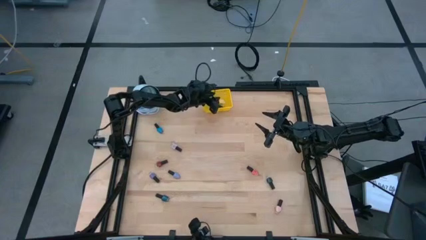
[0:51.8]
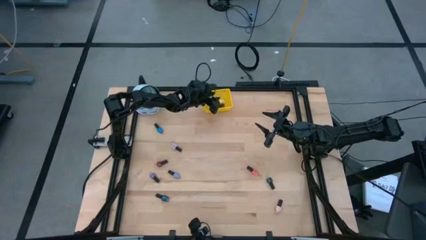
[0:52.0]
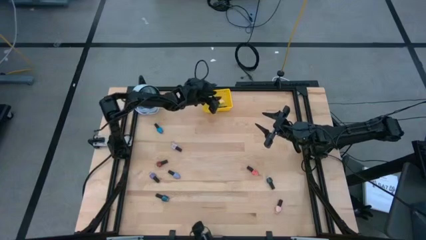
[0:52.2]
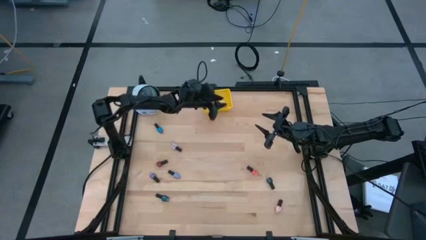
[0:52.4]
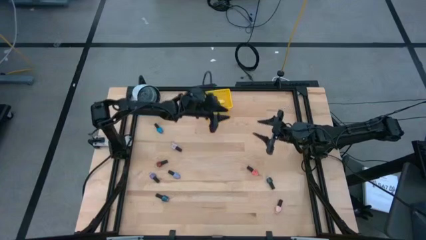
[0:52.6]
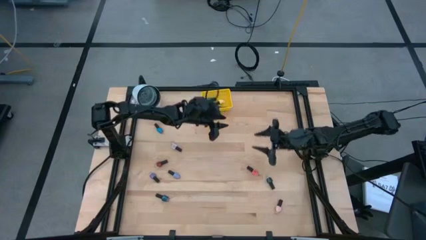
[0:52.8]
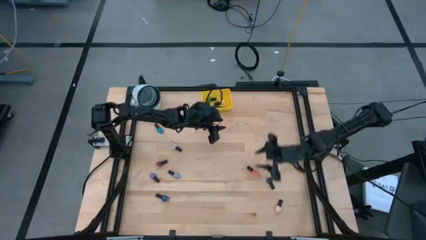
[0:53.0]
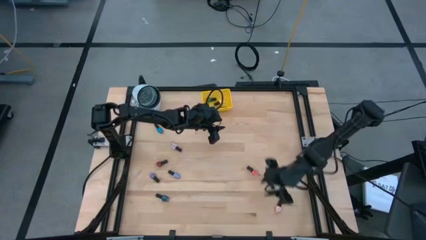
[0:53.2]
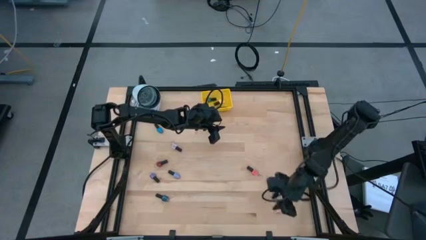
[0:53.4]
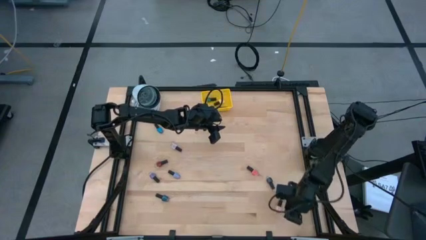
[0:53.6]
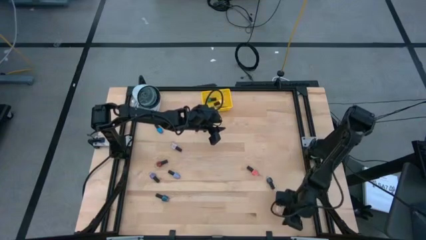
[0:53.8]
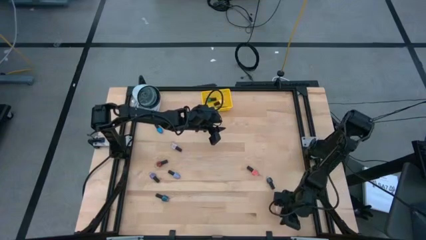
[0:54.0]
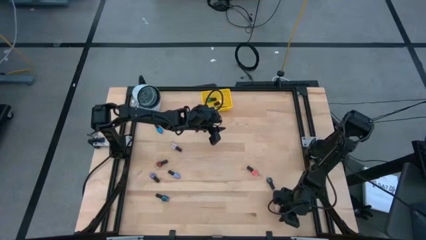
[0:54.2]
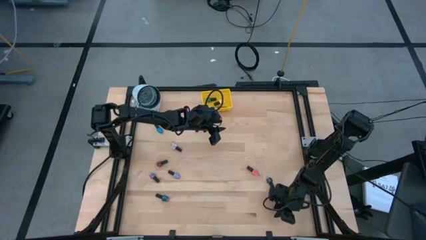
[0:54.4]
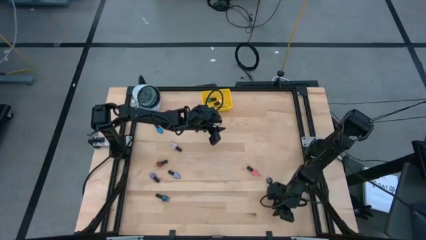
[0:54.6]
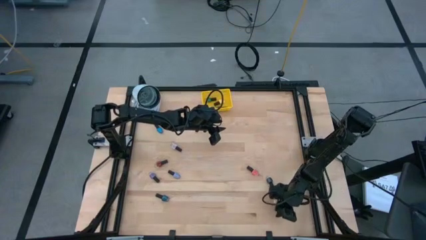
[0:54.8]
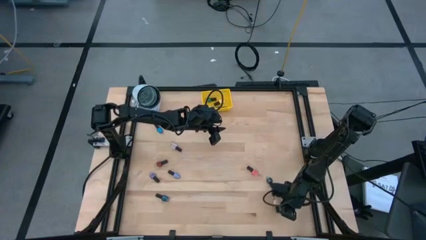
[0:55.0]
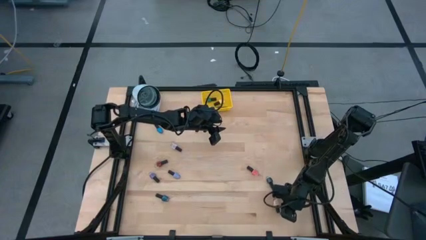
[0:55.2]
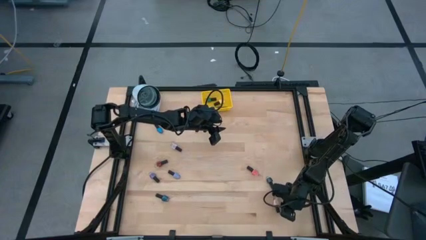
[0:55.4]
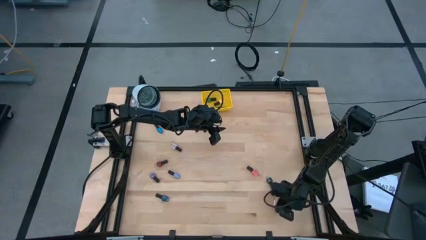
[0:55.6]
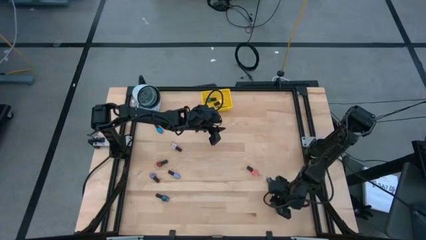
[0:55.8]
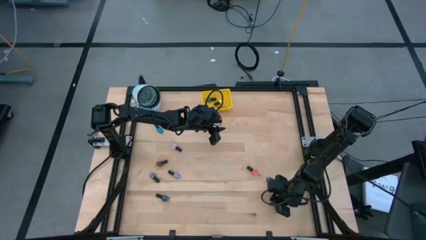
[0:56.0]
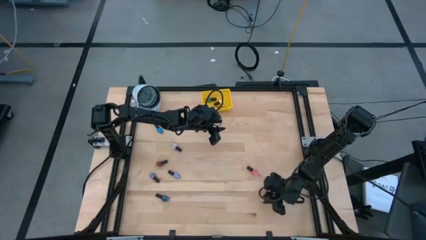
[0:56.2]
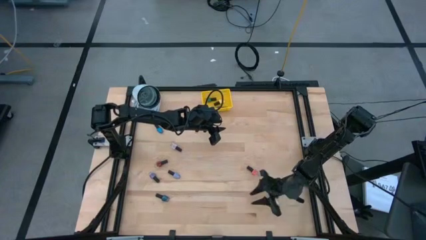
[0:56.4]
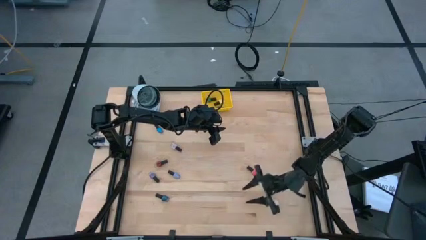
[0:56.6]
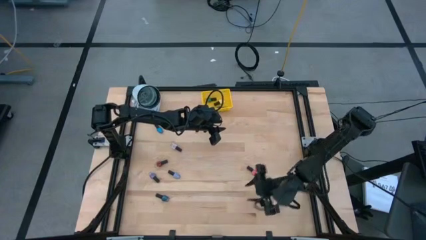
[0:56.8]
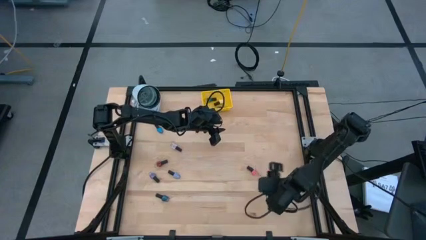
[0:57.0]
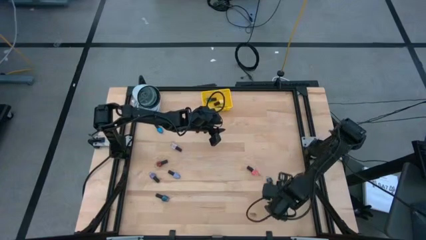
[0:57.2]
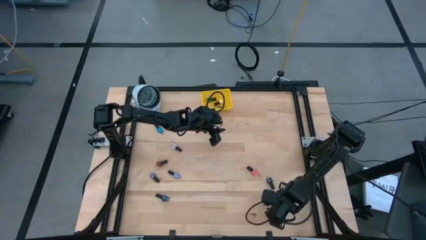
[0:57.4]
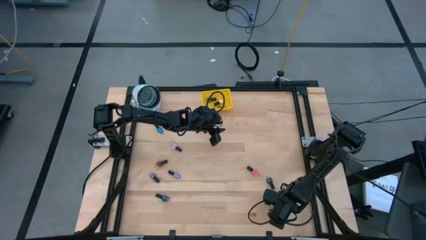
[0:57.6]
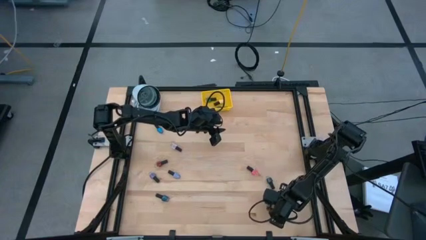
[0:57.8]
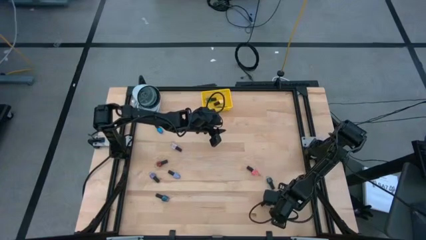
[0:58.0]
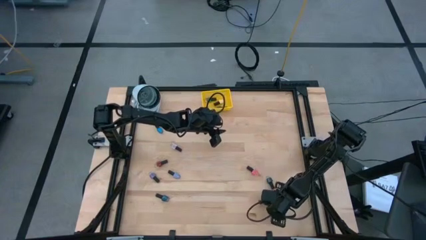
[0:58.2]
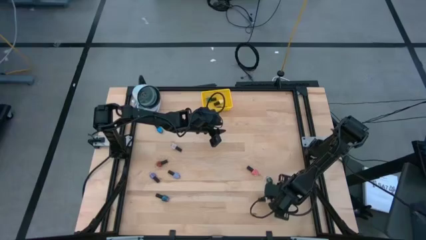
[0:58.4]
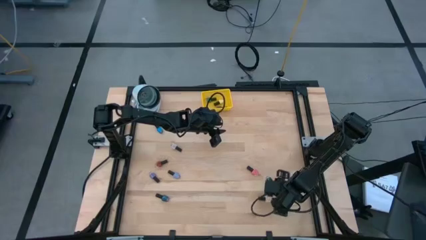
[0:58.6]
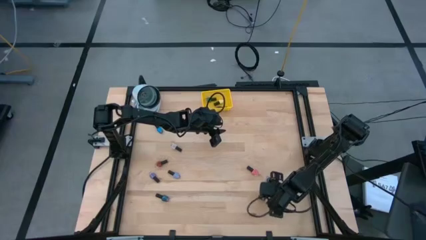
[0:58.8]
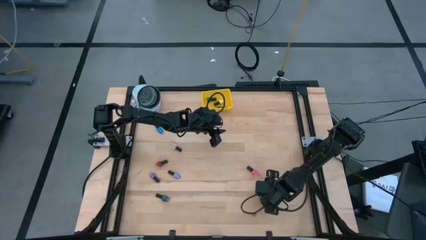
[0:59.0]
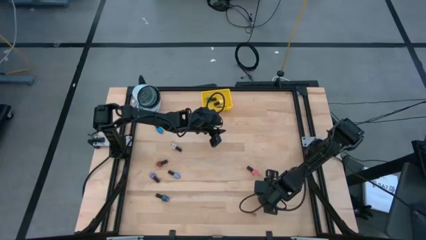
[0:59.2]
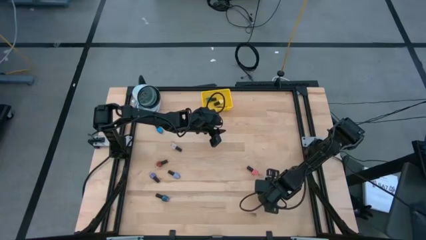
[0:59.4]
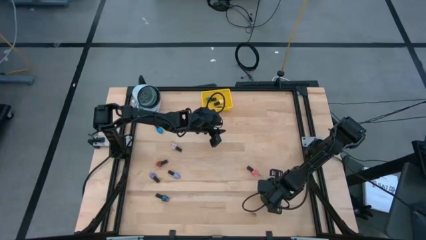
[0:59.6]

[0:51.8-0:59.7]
Task: Pick & Place Nail Polish
Put the light pink nail polish bottle into the yellow bin

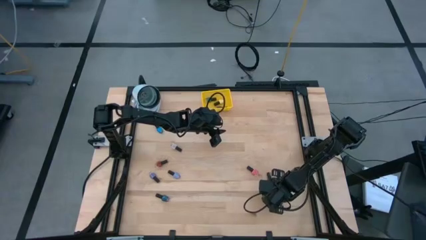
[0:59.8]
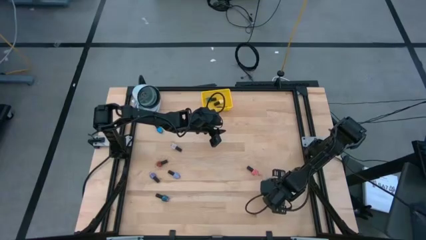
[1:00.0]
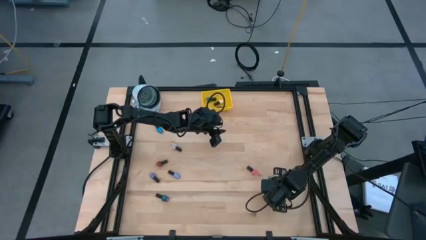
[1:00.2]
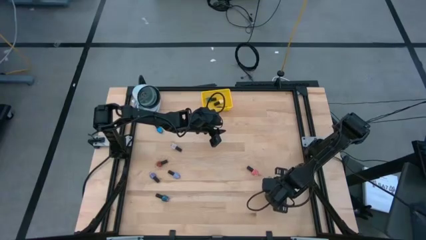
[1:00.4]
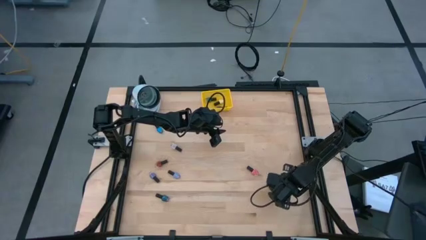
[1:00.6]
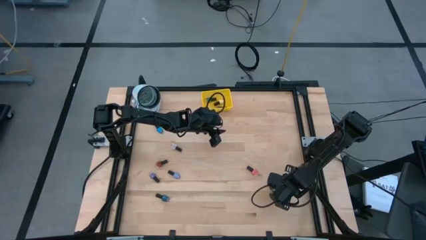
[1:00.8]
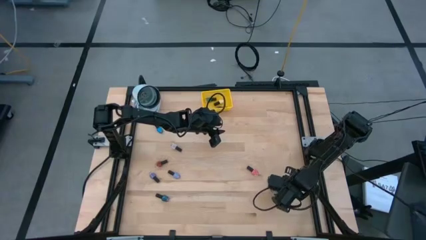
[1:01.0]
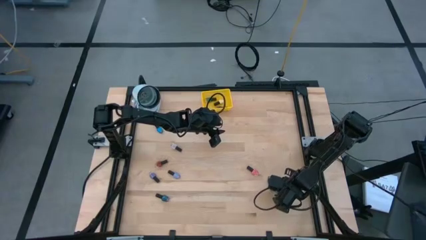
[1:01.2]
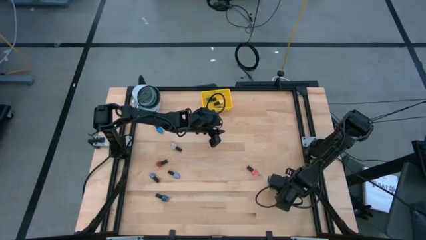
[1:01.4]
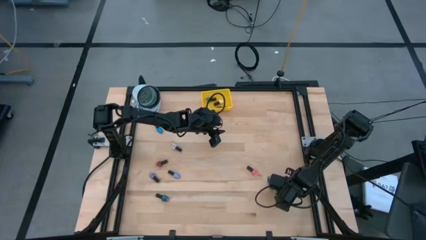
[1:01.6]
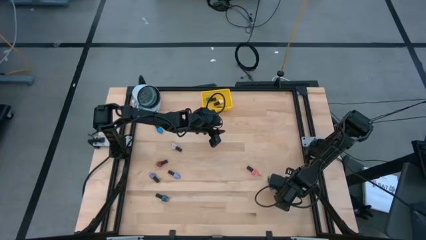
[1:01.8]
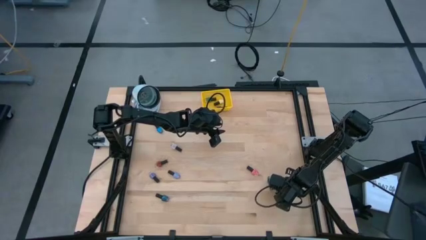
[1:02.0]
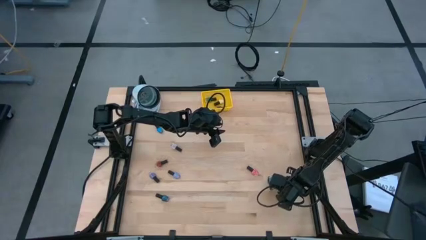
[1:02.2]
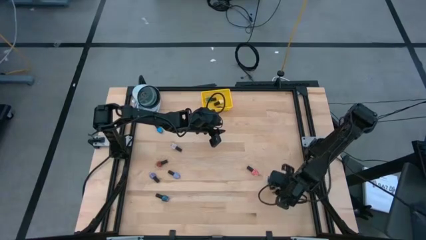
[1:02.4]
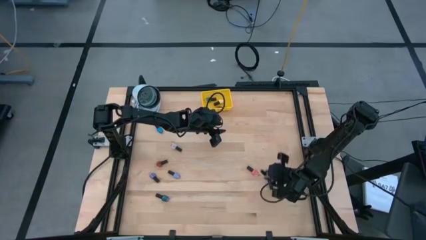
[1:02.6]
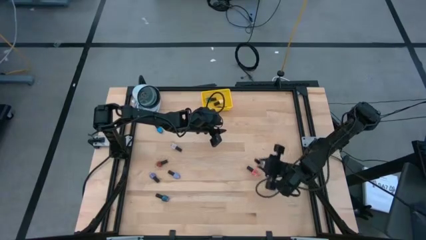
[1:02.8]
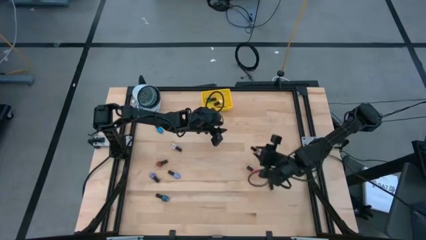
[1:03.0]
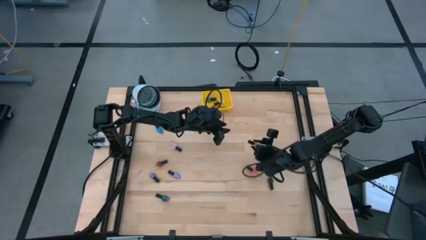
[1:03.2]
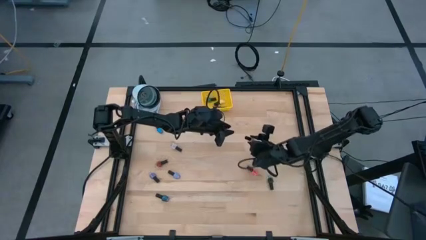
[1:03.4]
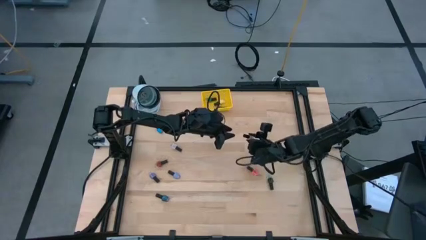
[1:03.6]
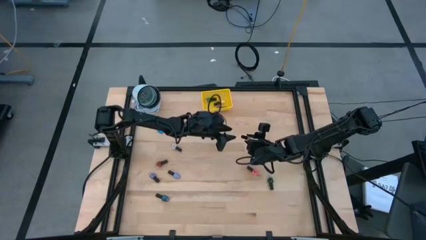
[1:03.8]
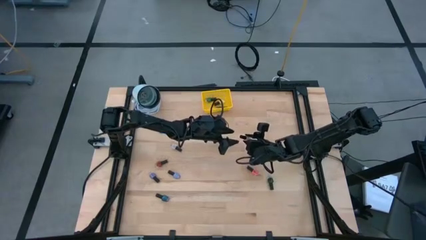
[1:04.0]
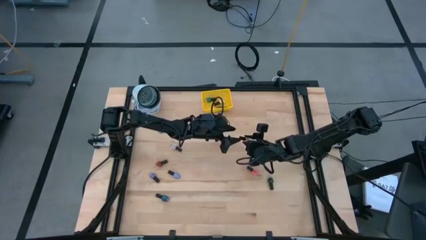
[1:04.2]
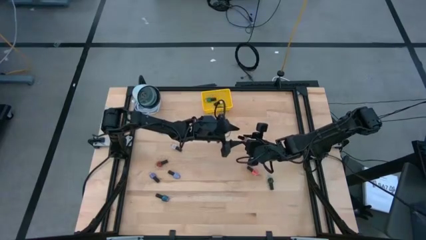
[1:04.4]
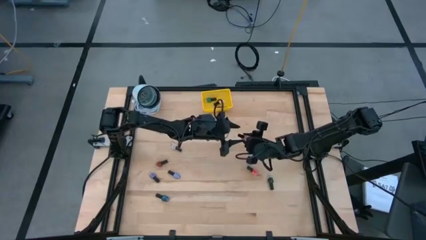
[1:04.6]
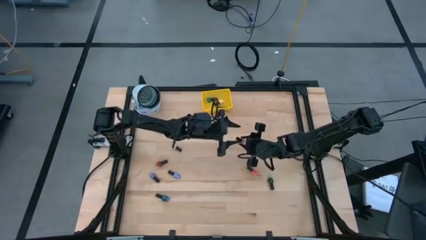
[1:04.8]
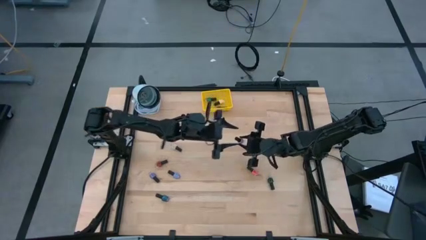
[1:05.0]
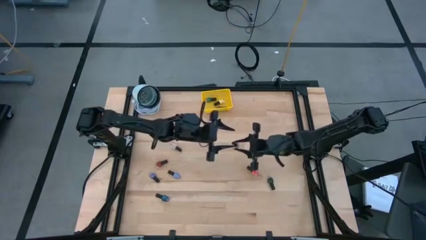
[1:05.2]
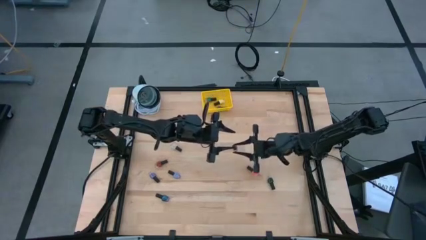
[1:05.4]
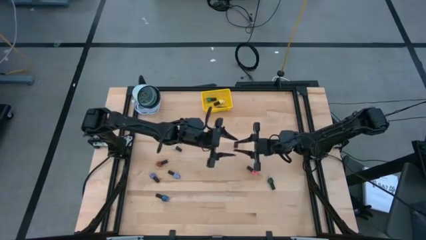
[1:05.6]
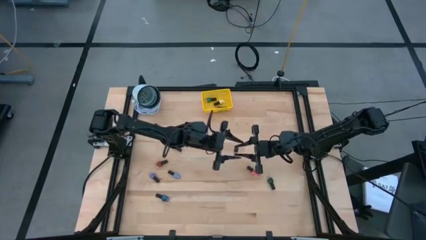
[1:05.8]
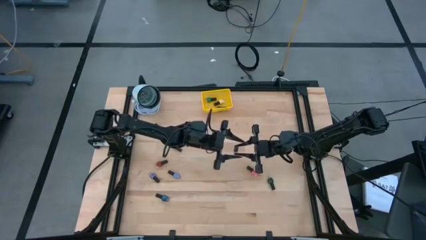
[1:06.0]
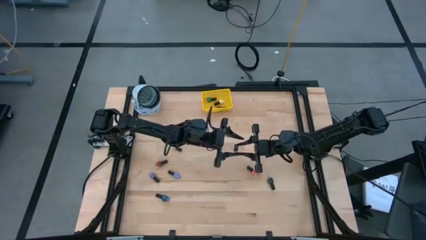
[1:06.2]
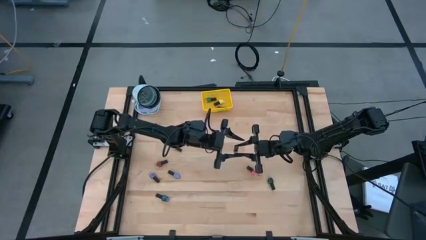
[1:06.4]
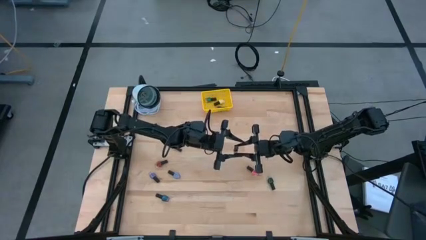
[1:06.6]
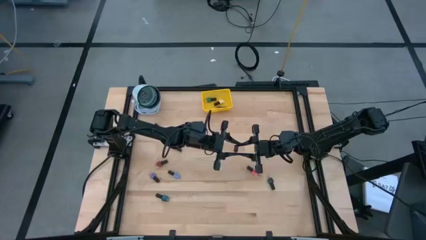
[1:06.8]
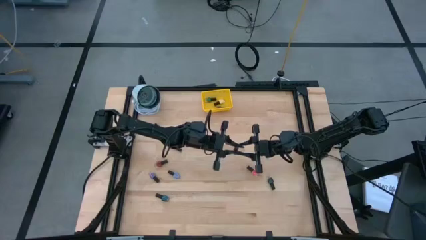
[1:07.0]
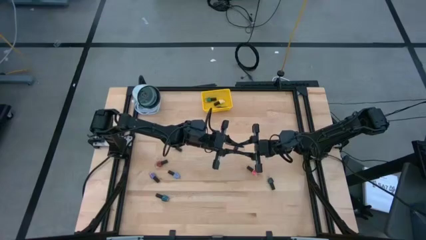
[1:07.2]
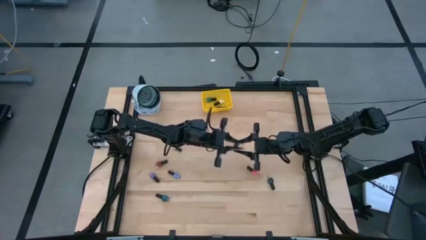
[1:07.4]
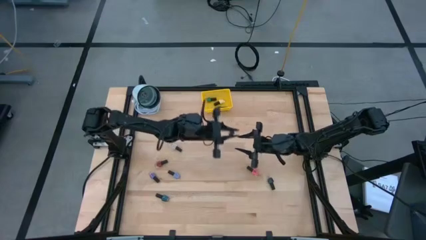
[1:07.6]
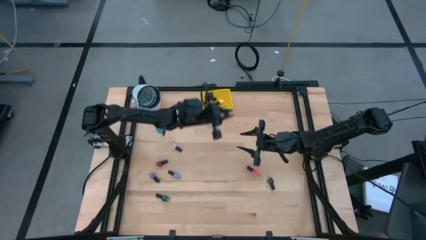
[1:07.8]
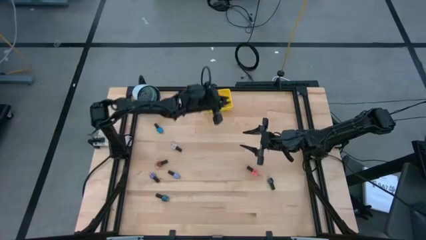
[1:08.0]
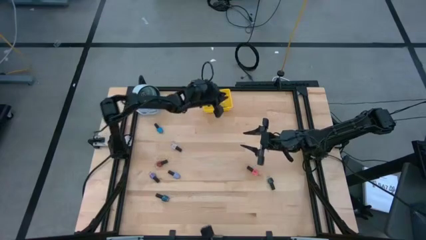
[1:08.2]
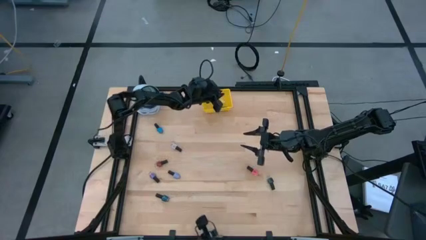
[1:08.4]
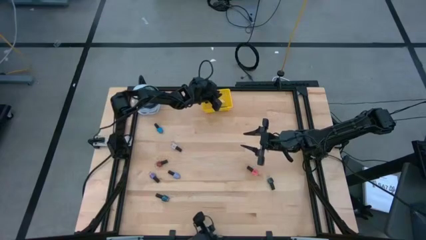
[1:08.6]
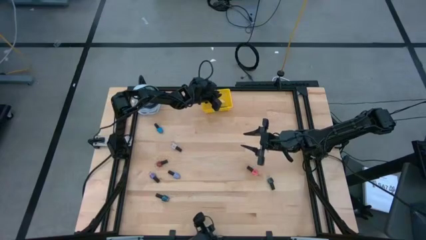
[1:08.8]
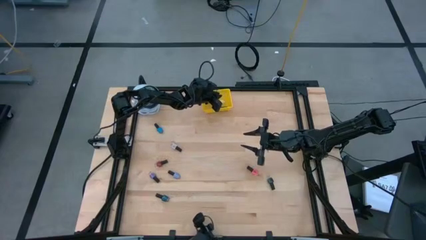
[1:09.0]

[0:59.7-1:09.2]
Put the light pink nail polish bottle into the yellow bin
